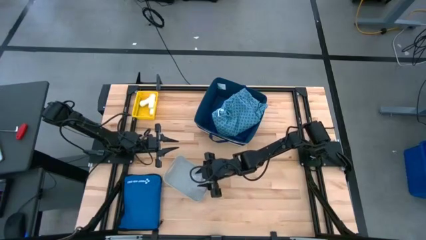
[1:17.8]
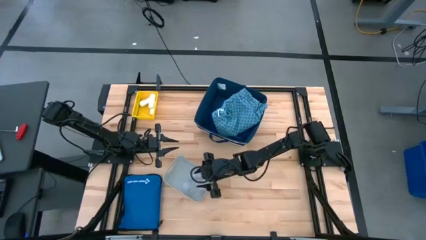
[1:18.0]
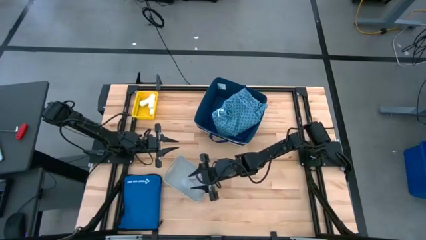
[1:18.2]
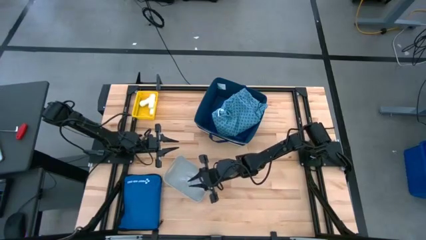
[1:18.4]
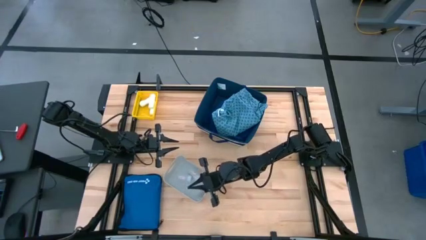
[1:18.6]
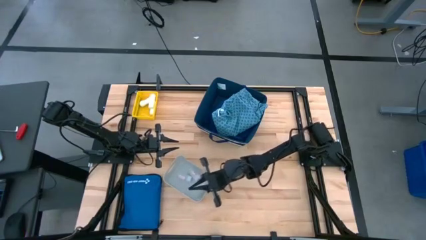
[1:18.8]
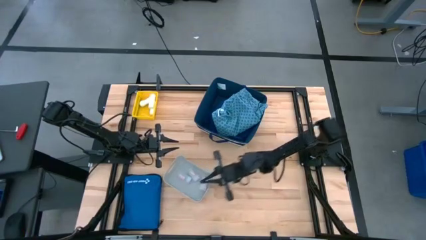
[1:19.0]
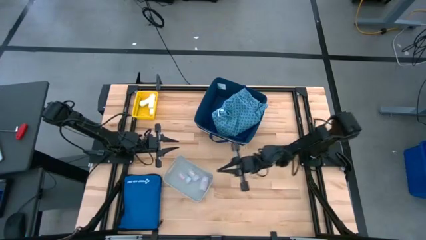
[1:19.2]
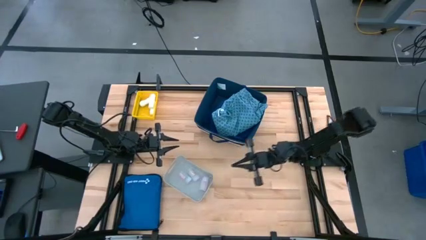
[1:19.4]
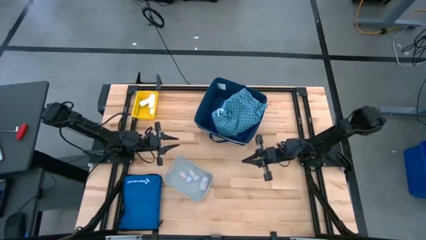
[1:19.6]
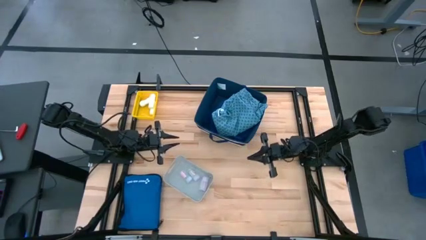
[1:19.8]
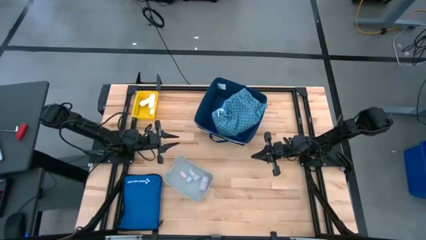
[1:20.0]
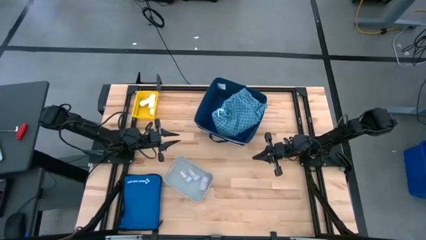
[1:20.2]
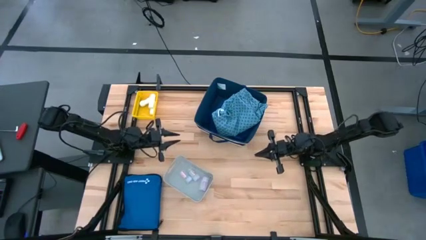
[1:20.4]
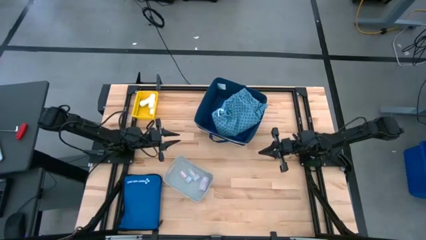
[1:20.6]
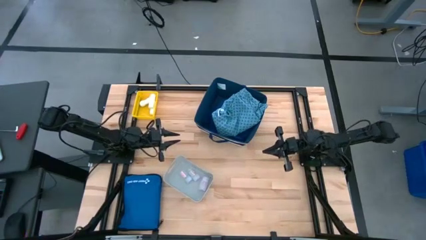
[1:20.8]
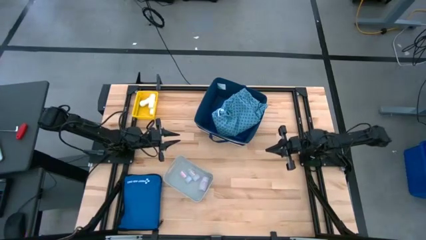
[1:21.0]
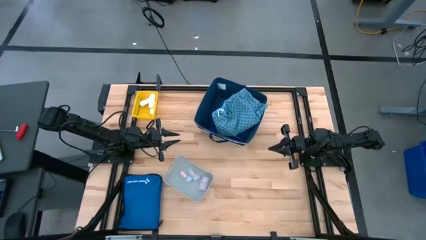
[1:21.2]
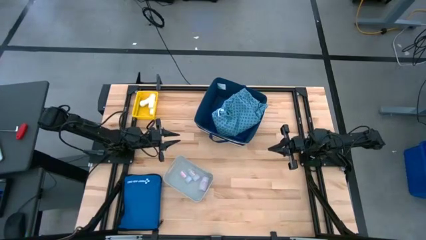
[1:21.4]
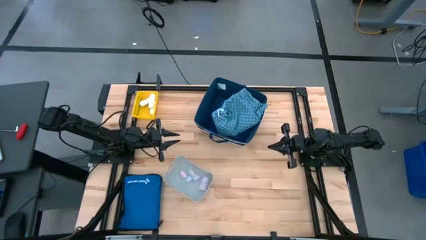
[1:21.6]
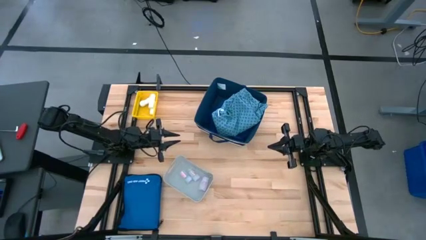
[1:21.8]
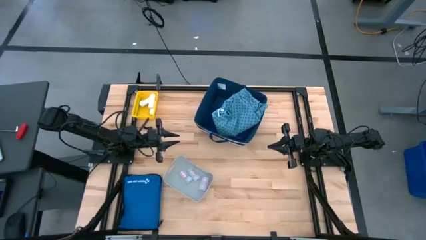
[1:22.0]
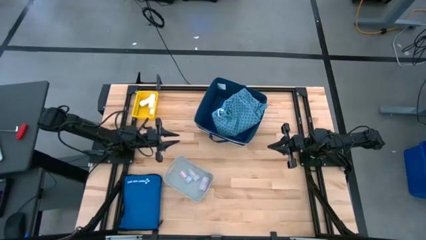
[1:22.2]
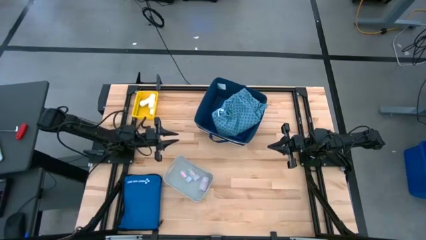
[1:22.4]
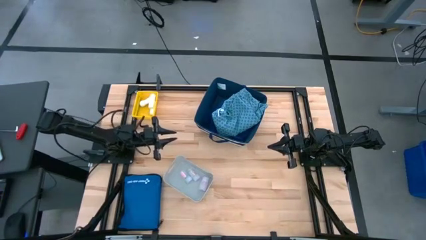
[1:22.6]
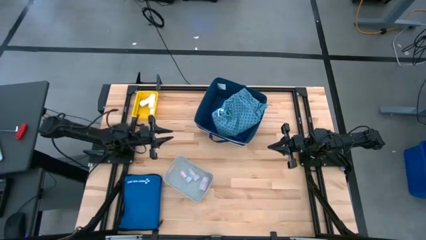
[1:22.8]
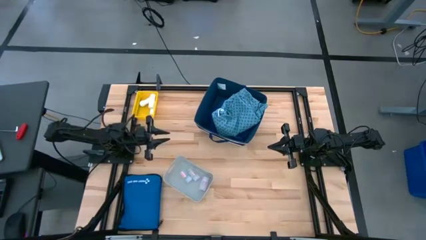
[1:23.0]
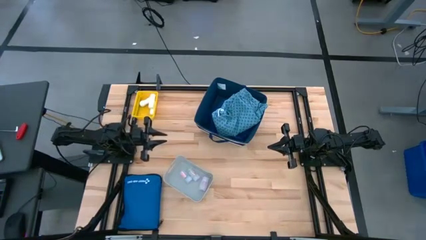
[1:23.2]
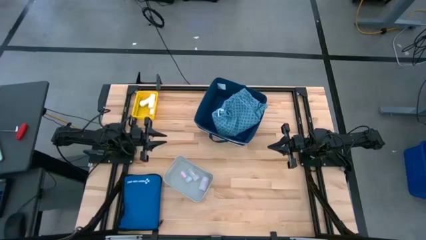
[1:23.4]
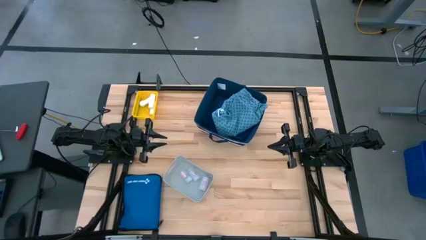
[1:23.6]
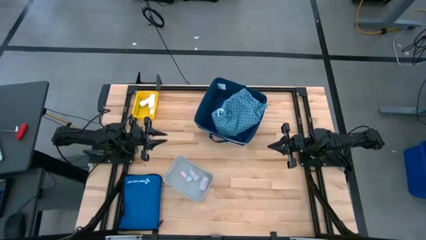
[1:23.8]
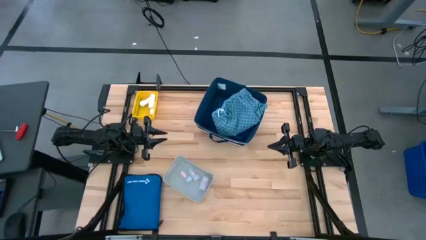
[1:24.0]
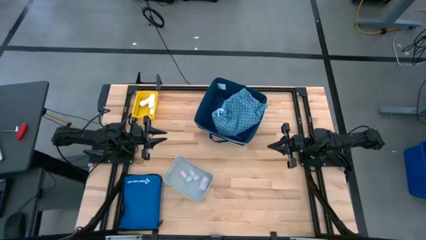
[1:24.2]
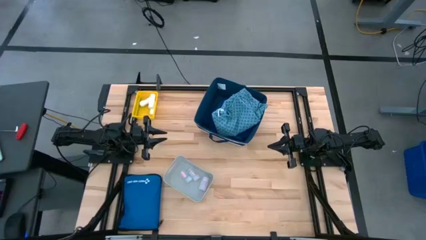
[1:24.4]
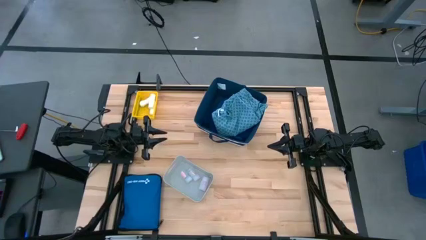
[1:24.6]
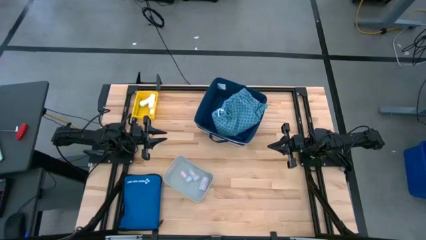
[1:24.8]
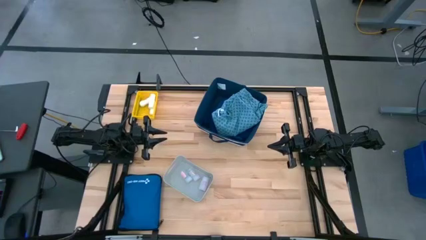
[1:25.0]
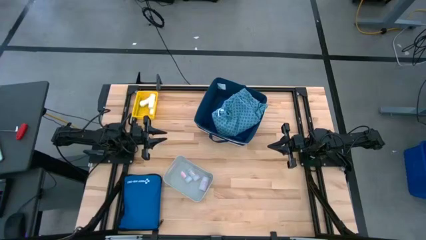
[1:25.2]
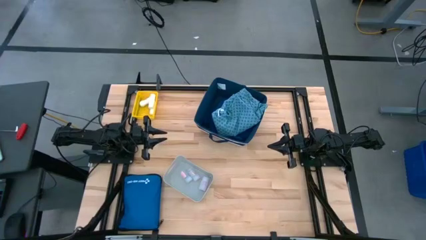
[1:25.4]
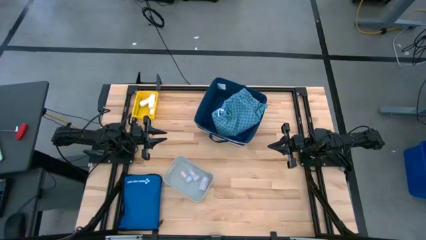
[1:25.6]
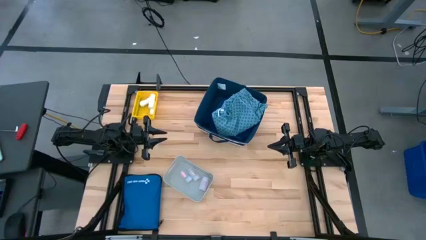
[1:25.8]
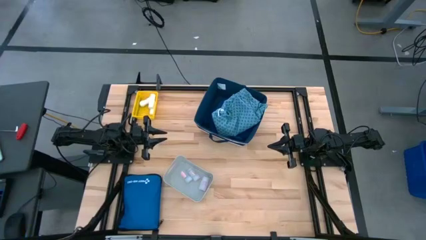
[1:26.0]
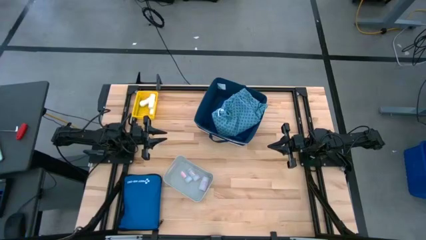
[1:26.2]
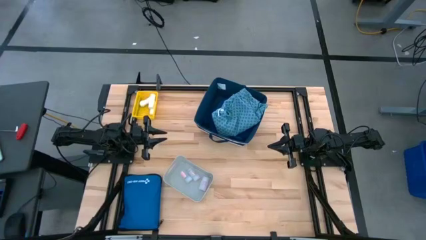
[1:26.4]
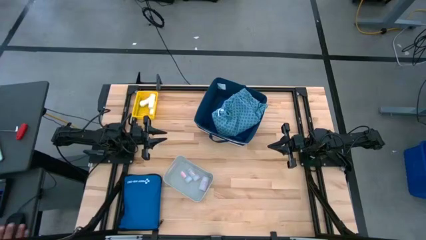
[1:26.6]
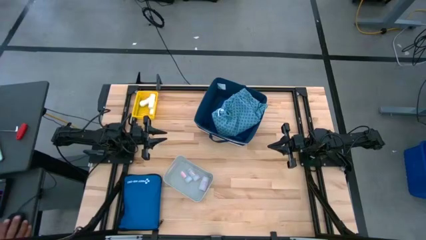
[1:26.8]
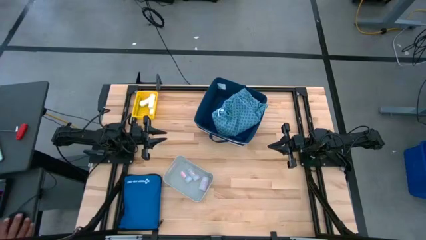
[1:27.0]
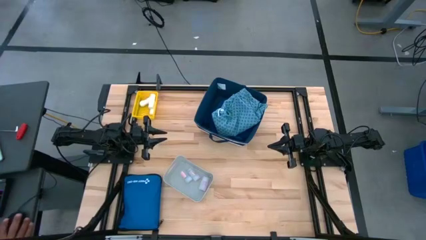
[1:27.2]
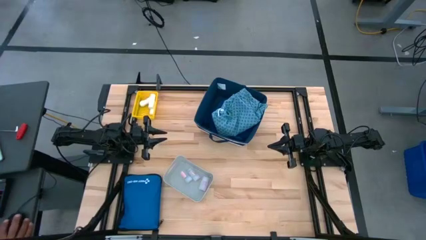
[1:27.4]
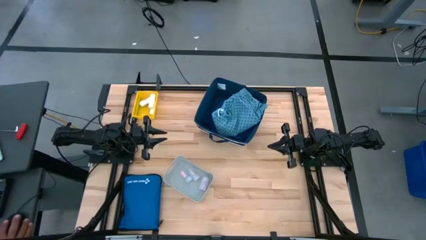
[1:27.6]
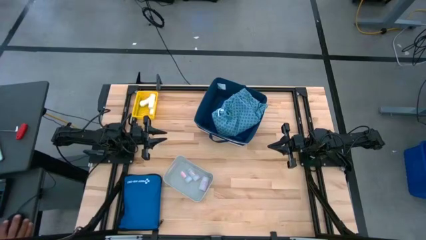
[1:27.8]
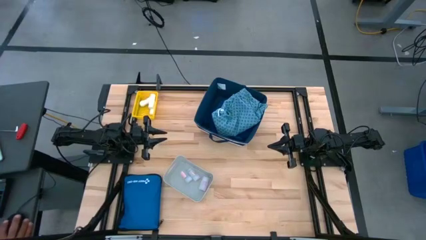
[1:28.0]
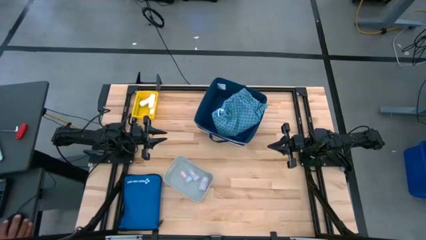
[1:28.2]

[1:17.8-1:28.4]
Task: Pick & place medical supplies in basket/bin
Return to Home Position

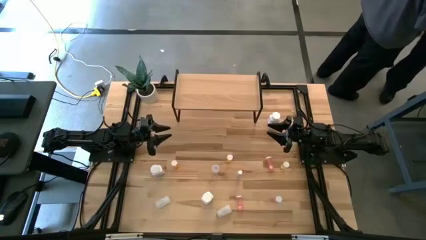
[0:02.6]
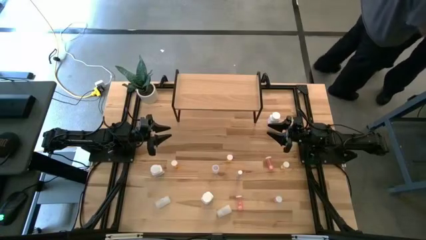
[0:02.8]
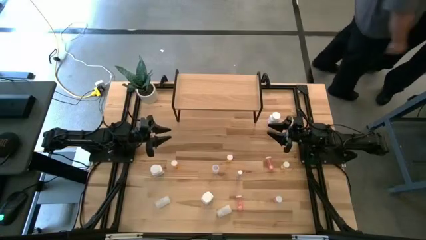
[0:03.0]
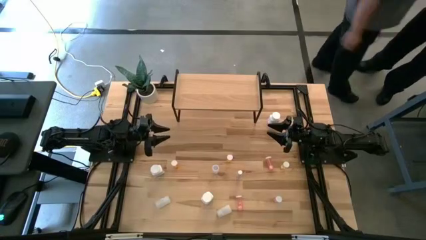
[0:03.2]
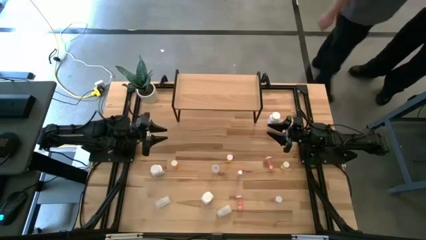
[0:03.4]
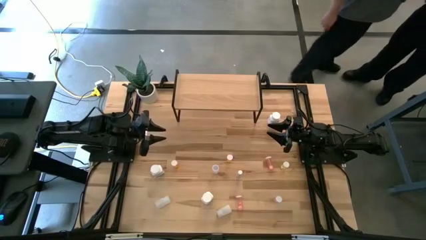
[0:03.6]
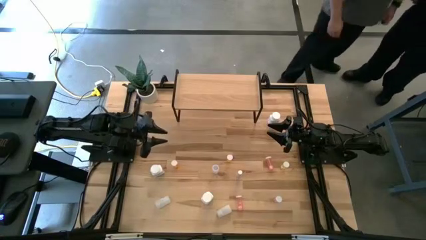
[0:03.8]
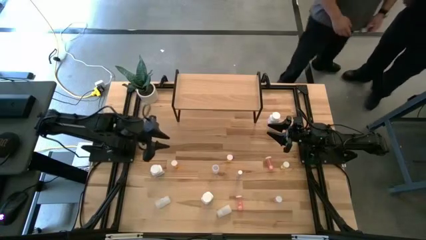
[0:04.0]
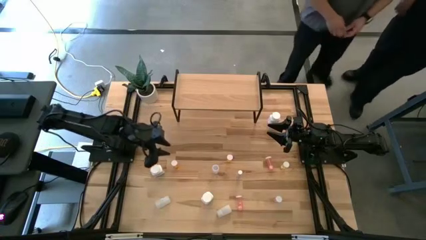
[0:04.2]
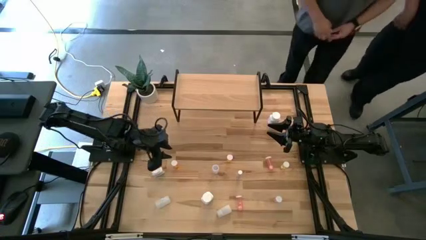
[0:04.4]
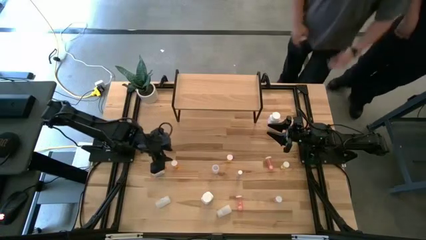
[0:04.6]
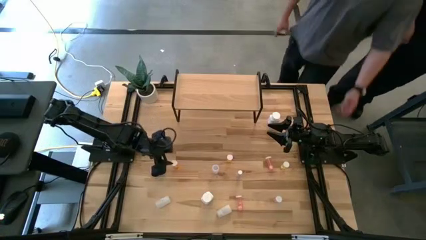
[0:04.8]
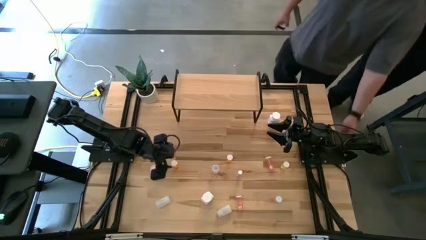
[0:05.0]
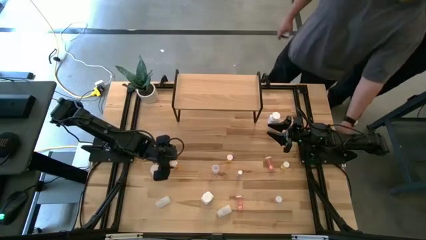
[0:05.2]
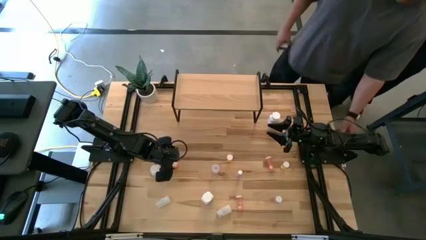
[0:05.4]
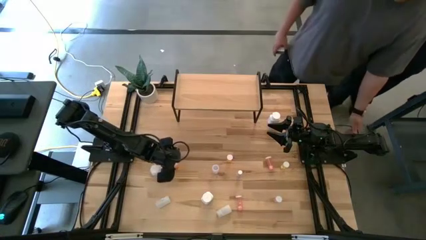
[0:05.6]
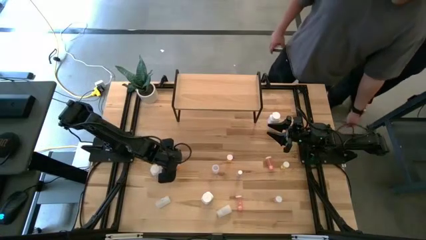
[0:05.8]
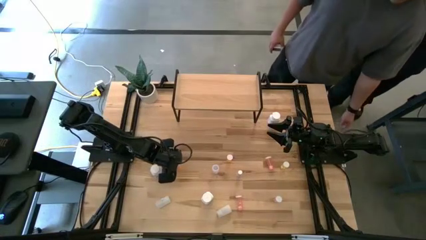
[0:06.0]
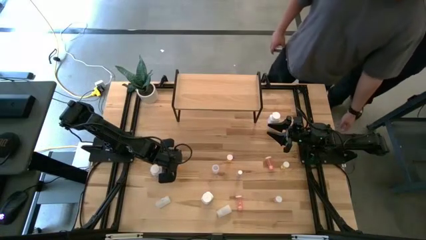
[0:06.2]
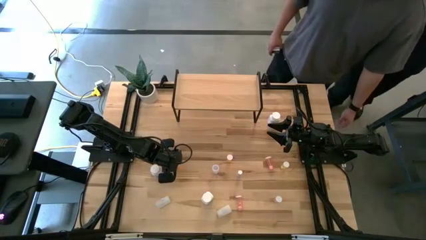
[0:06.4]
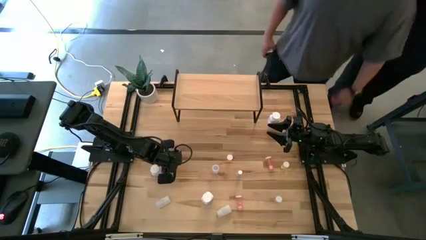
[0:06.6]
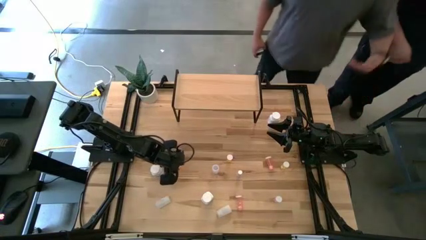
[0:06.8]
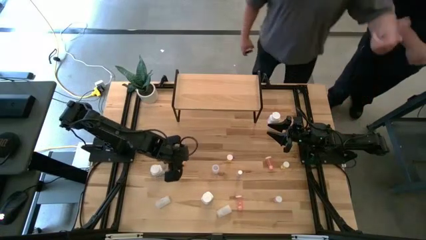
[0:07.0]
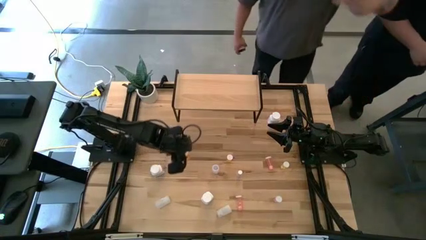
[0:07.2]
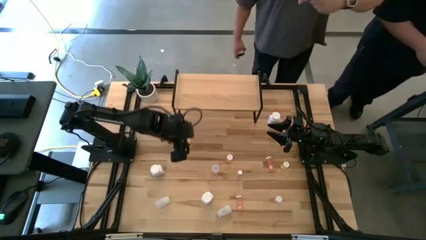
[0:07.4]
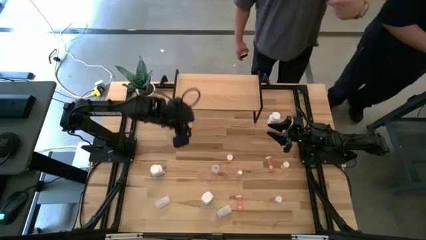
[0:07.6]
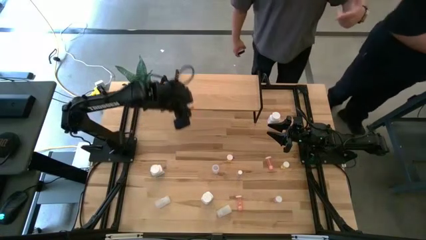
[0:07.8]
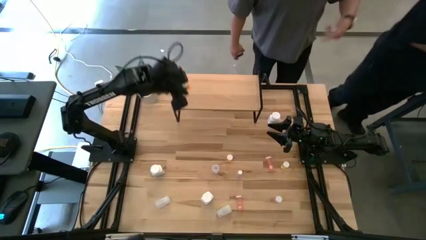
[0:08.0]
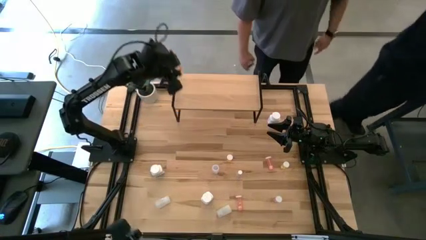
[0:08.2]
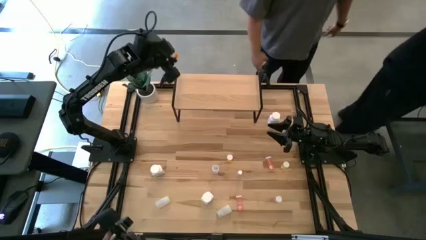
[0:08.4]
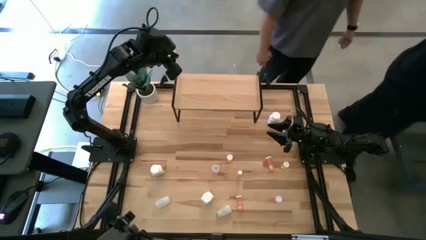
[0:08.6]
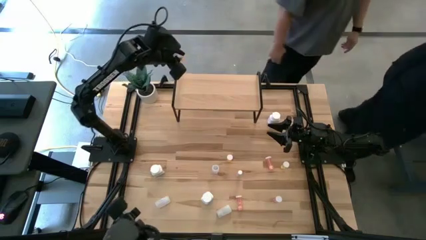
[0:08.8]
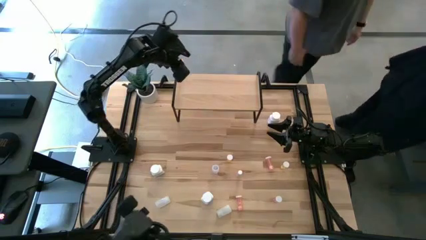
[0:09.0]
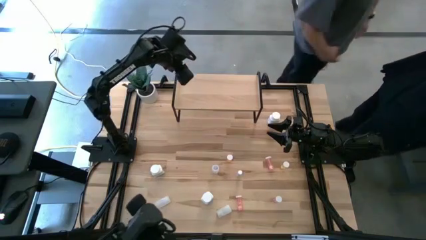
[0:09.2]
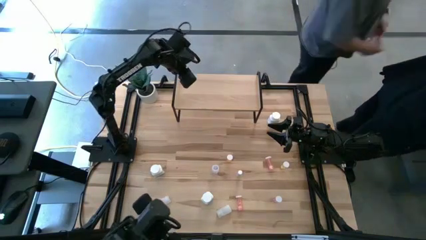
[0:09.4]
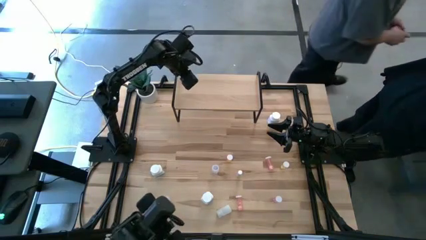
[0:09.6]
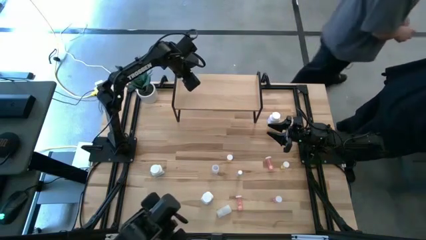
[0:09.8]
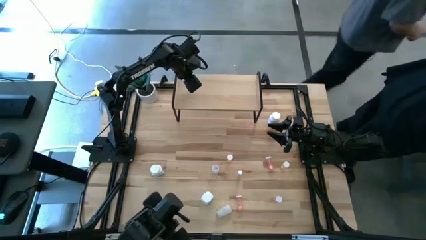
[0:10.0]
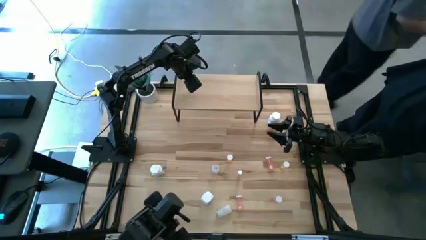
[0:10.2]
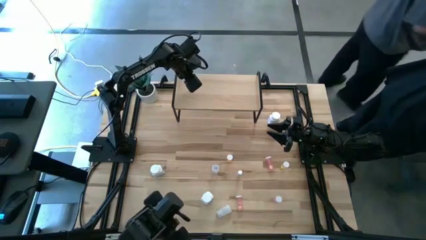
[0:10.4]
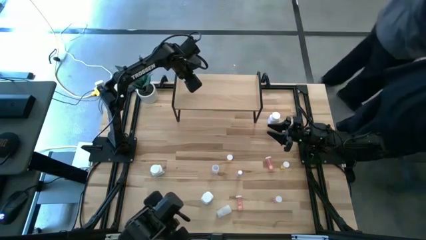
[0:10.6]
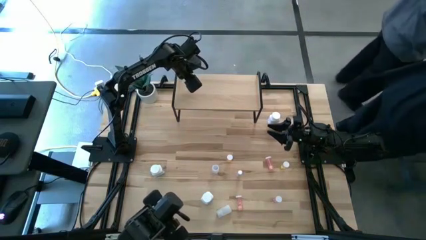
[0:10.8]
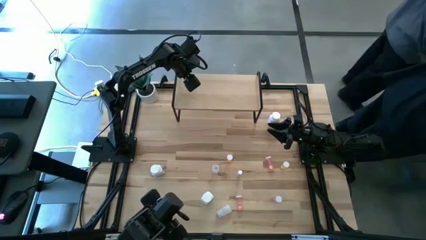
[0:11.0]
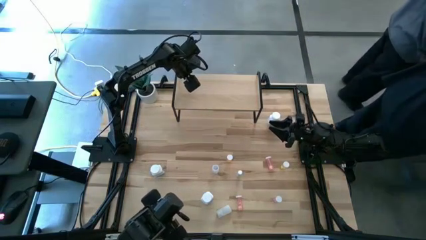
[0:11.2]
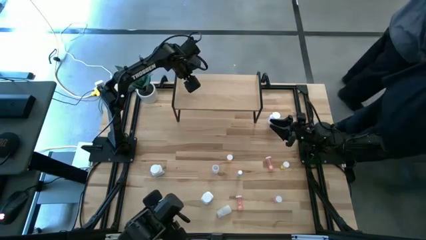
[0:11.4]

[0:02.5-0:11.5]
Task: Pick and place medicine bottles onto shelf by color
Put the left orange pill bottle on the shelf
